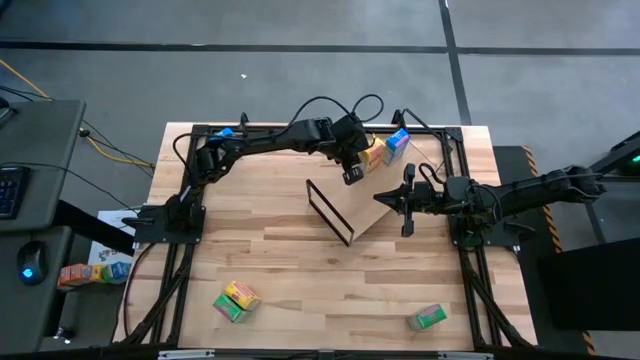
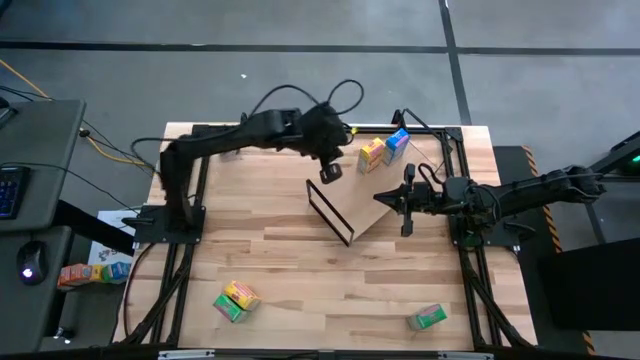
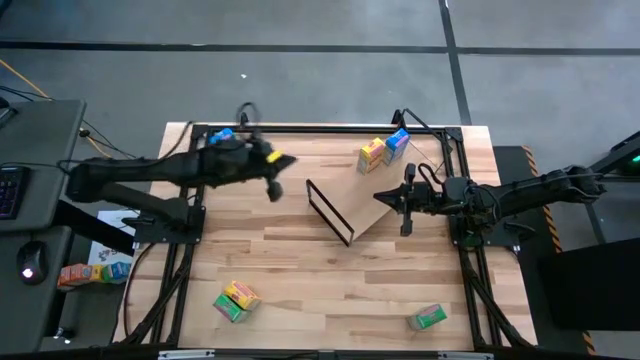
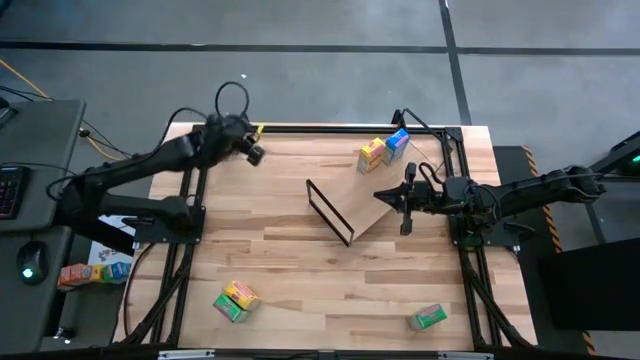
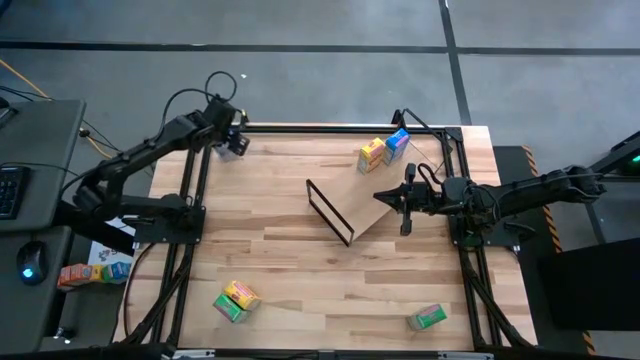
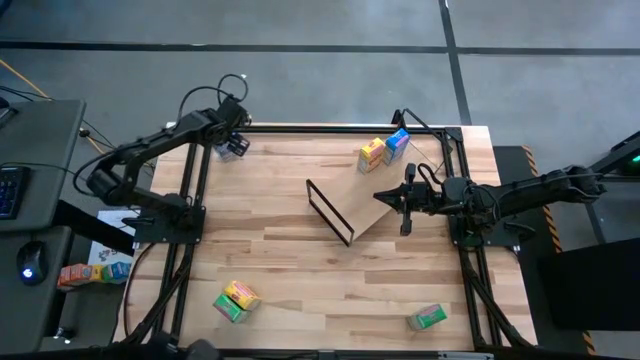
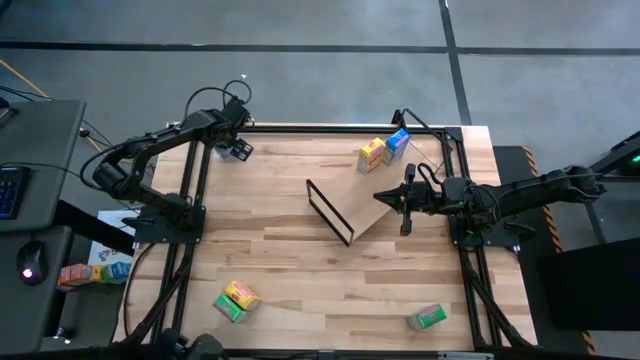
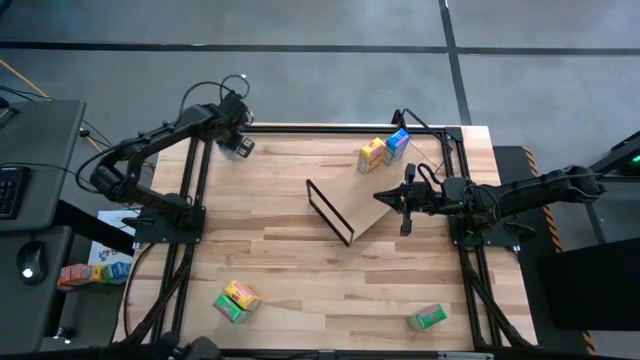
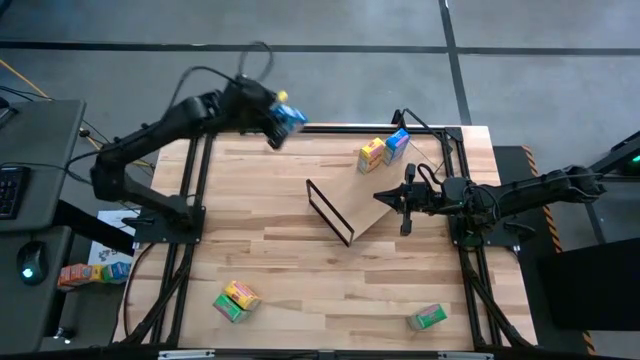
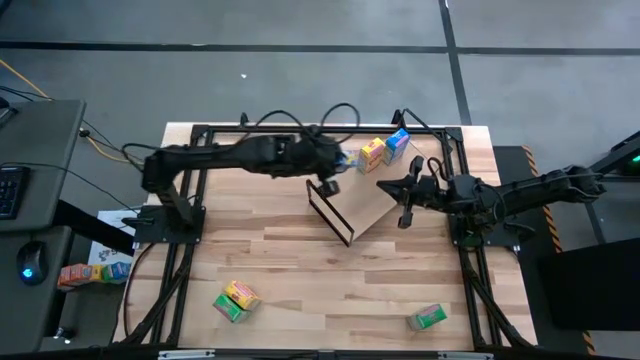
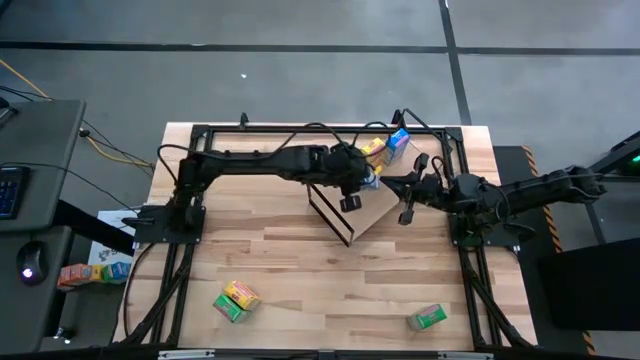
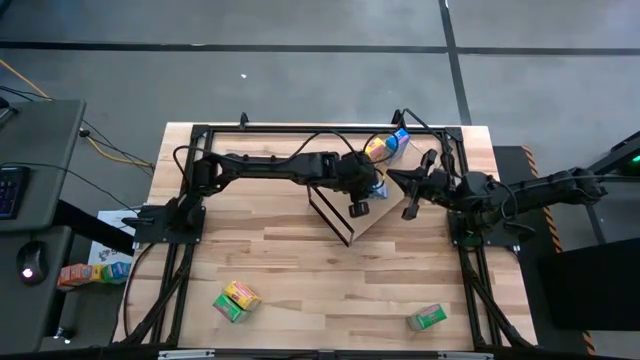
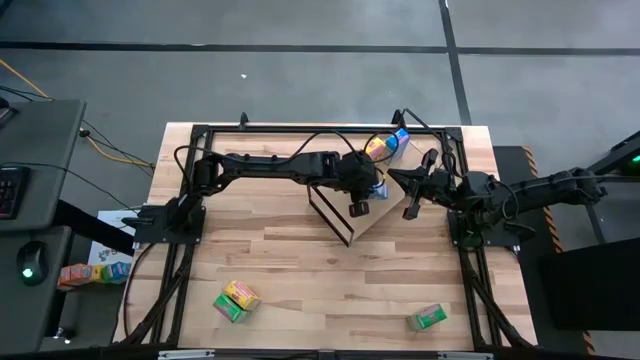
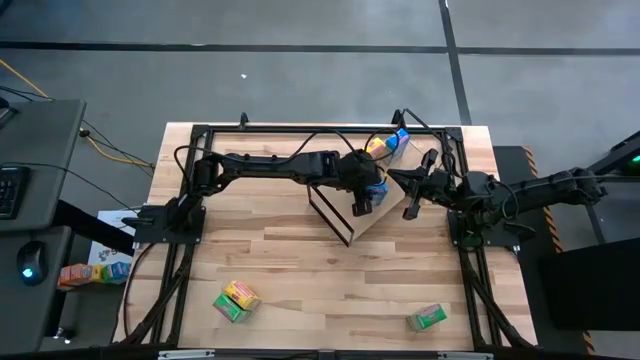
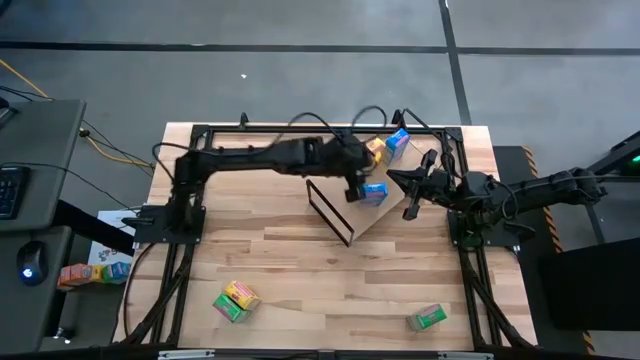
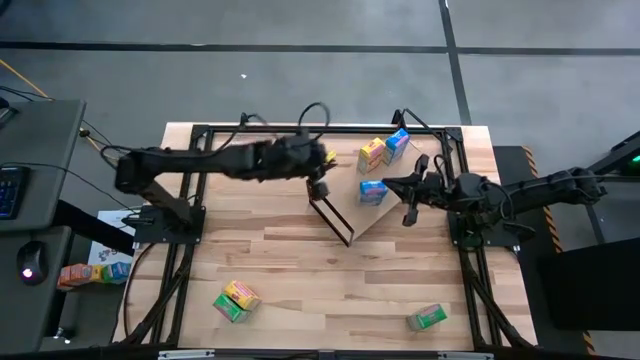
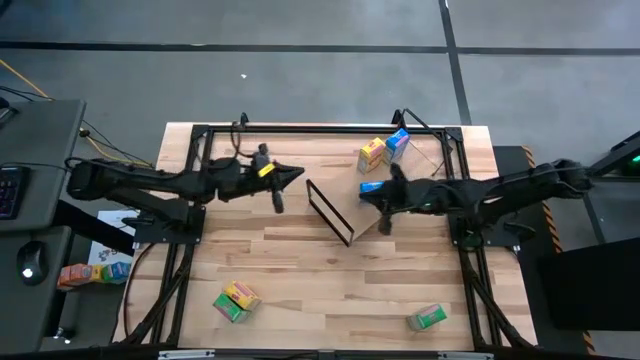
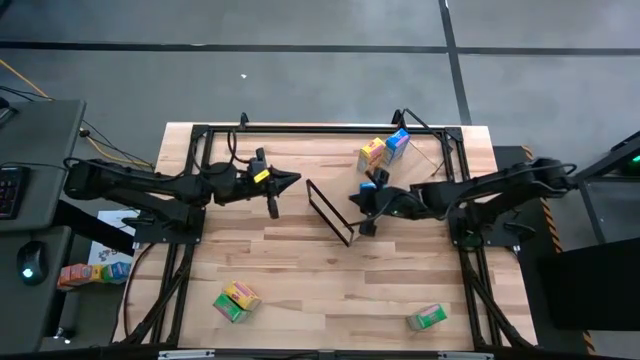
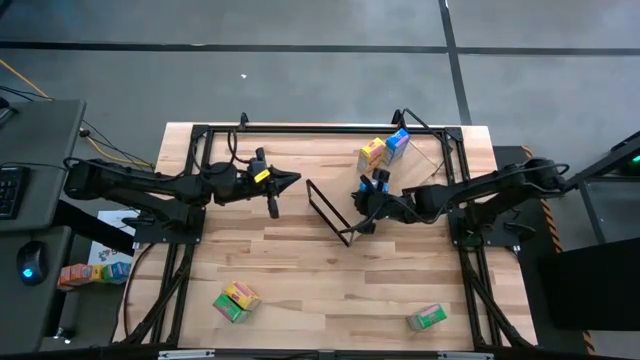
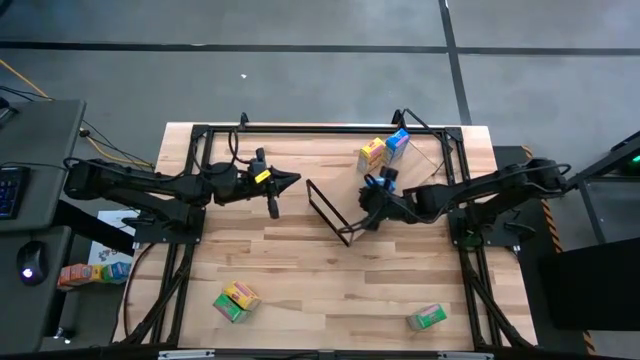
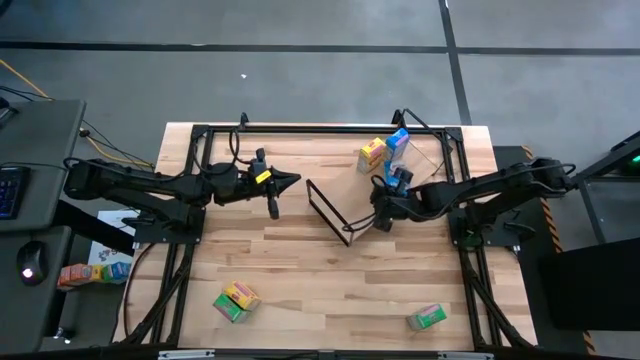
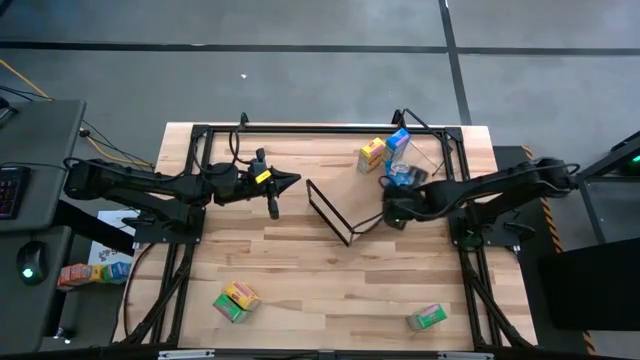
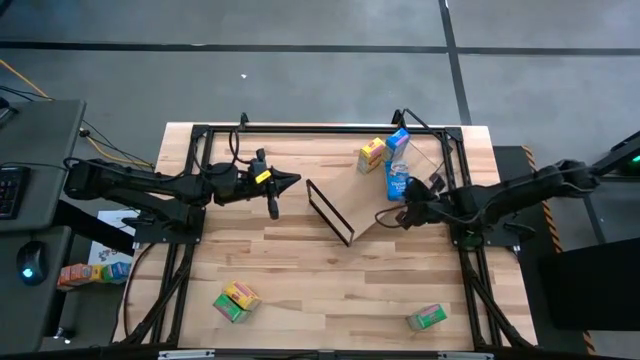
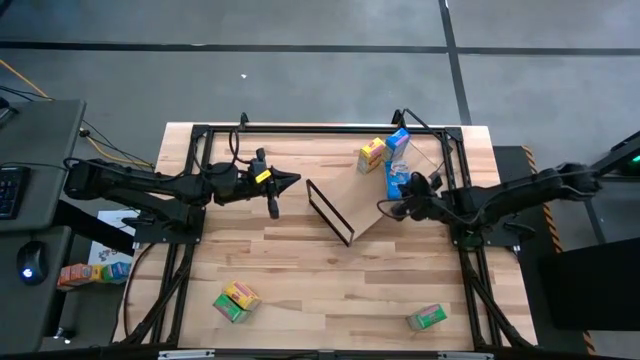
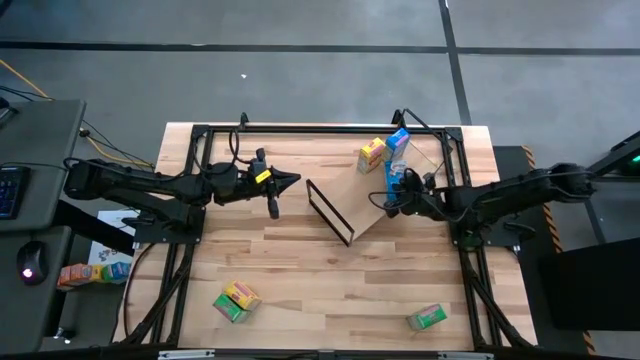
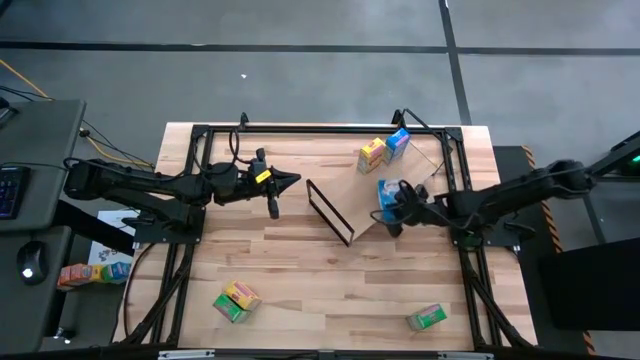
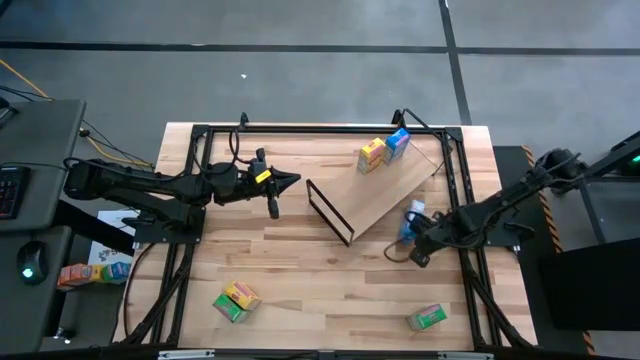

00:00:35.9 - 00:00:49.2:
Task: Stack cereal on shelf
Put the blue cereal box on the shelf aligned with the blue cereal box

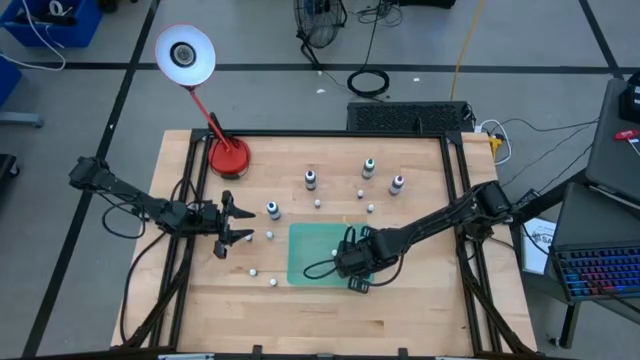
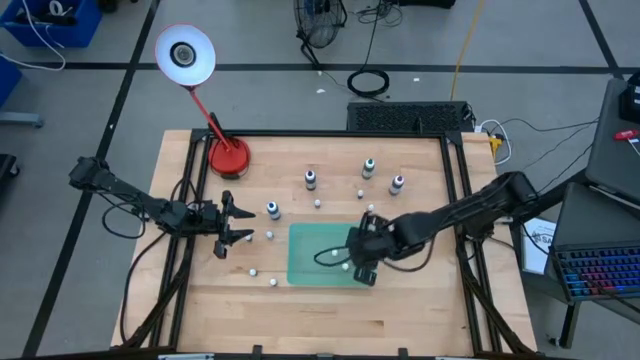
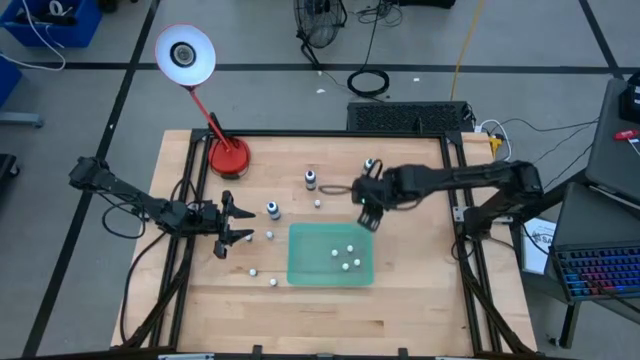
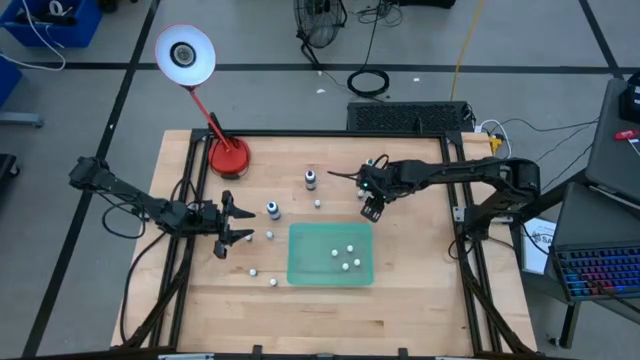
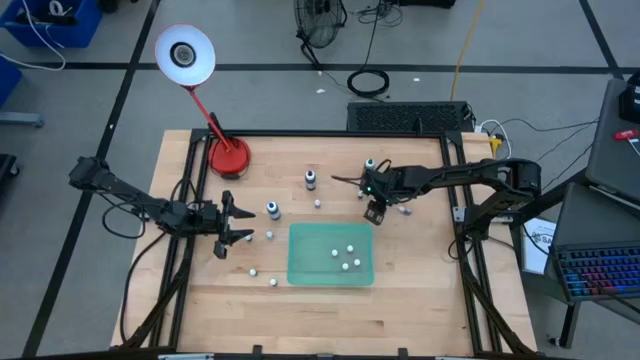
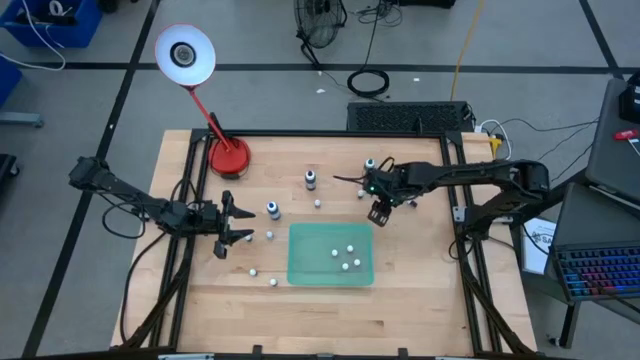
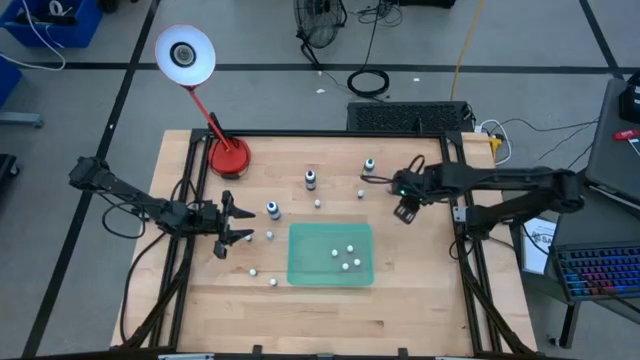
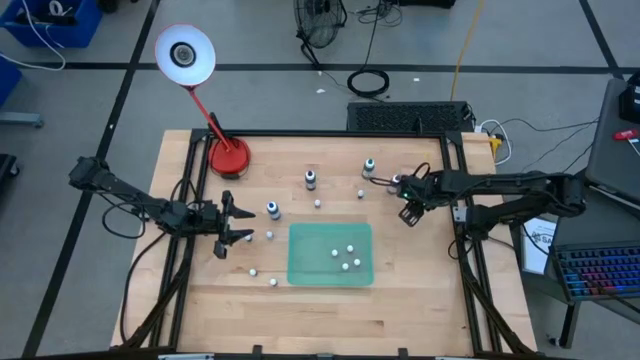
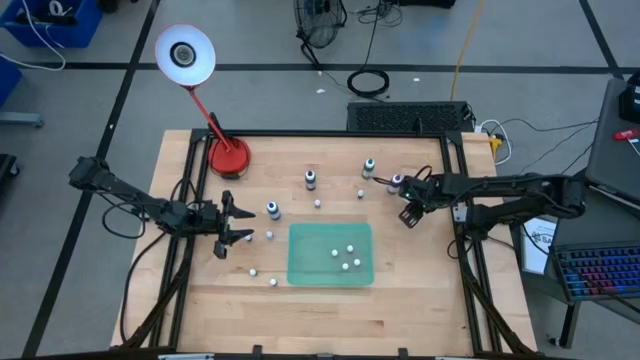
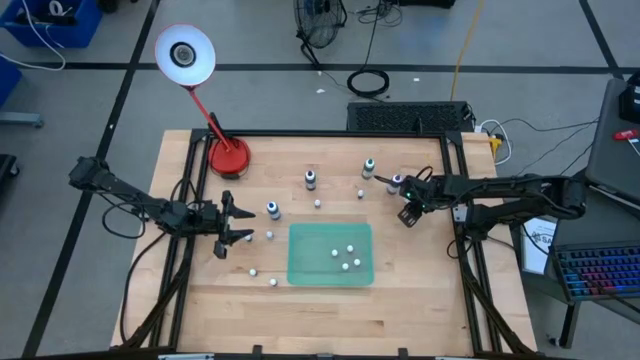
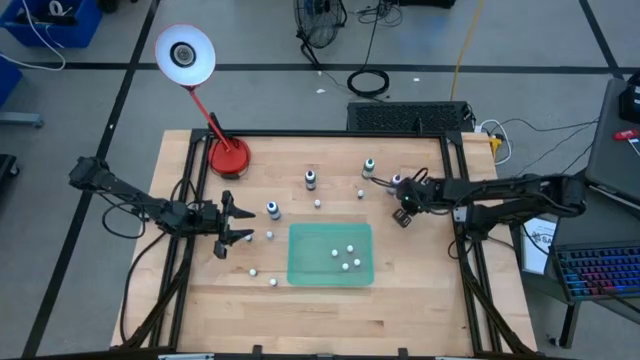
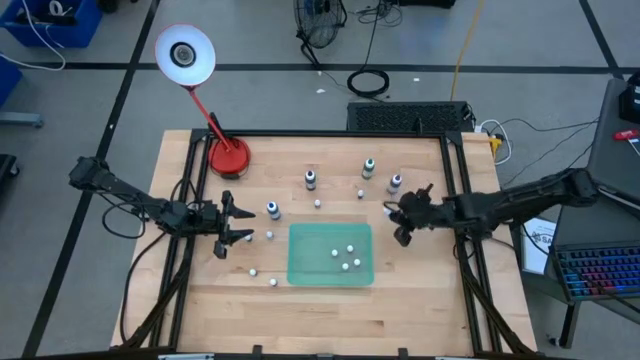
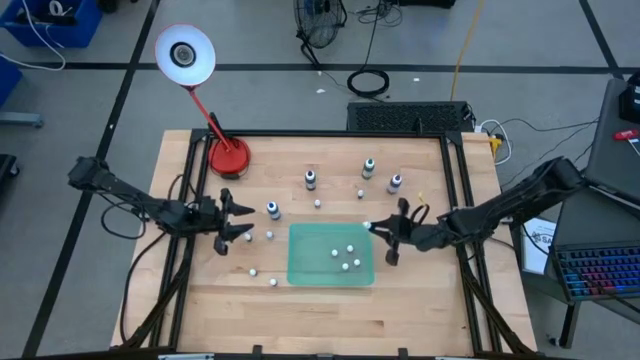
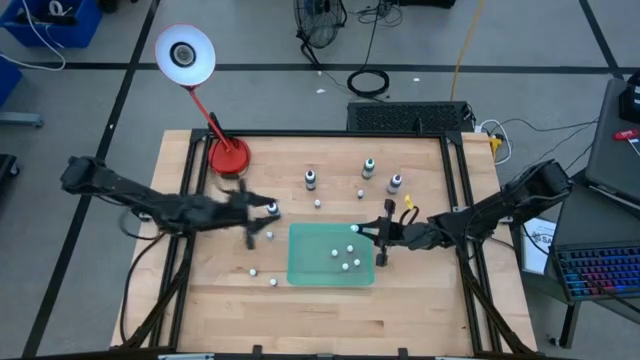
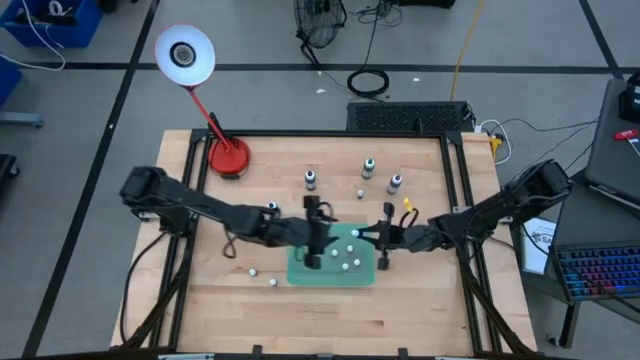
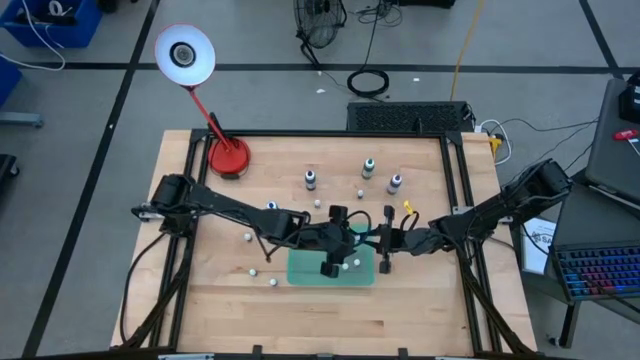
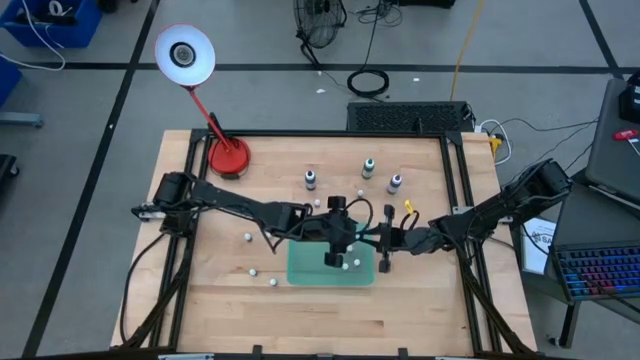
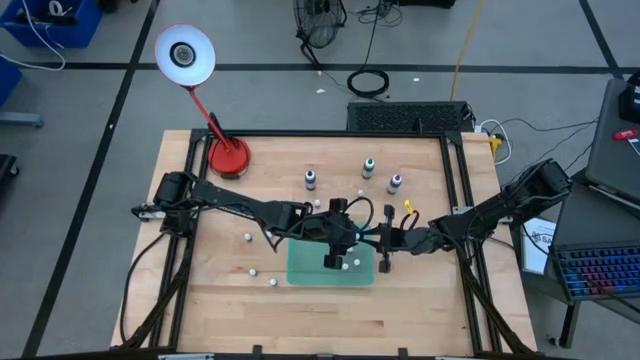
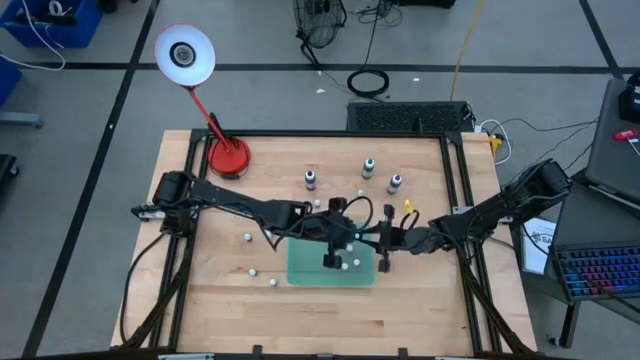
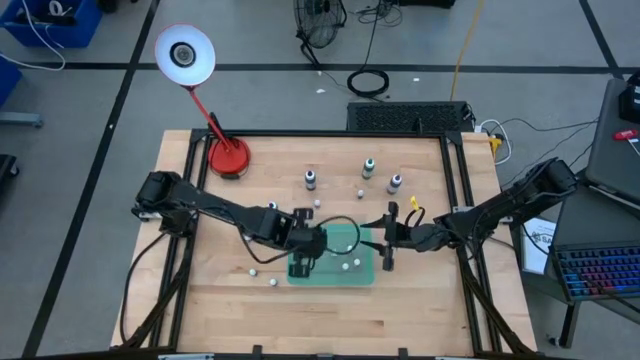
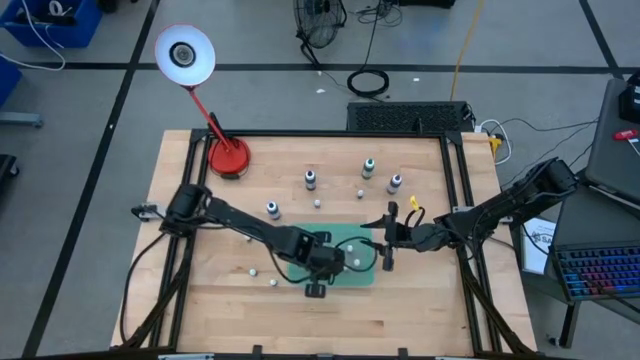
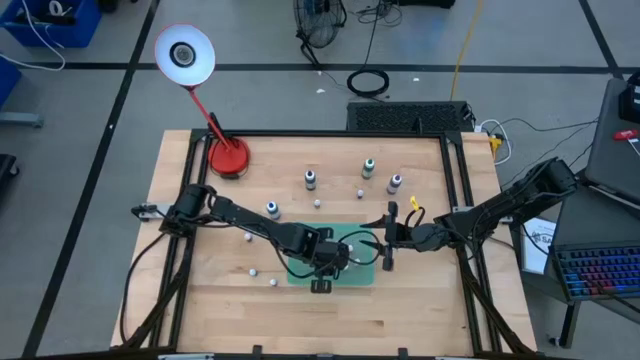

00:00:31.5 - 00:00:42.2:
Task: Pick & Place food coloring
Put the small purple food coloring bottle into the green bin
